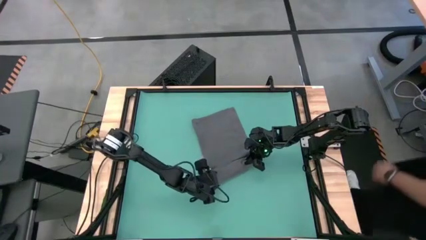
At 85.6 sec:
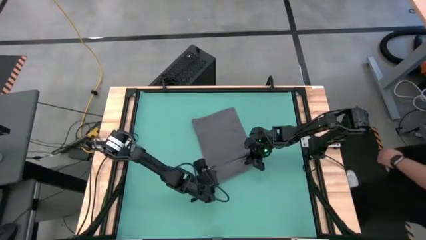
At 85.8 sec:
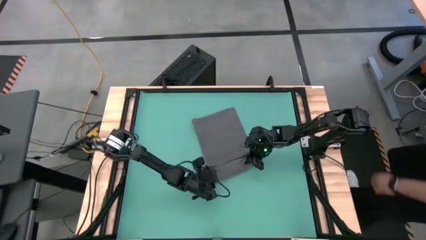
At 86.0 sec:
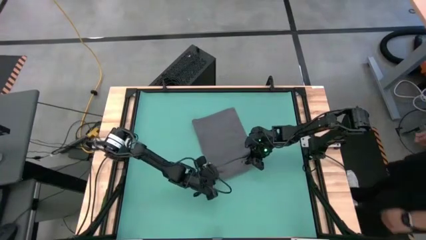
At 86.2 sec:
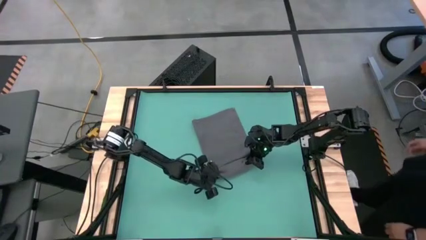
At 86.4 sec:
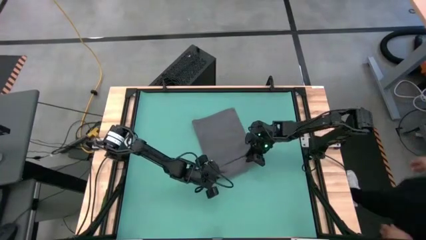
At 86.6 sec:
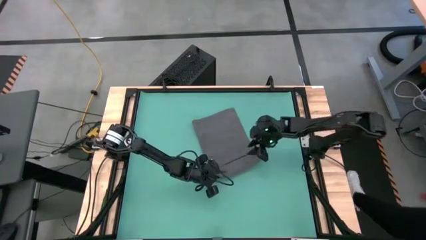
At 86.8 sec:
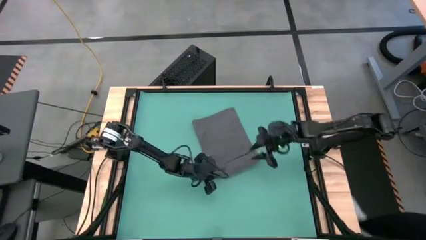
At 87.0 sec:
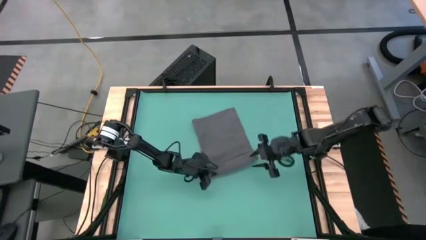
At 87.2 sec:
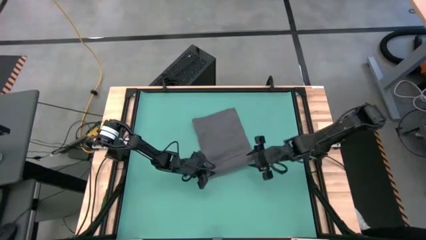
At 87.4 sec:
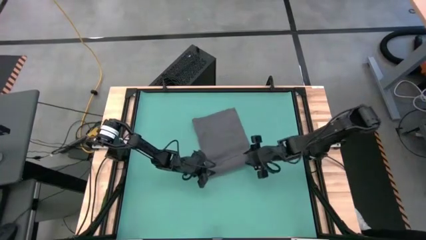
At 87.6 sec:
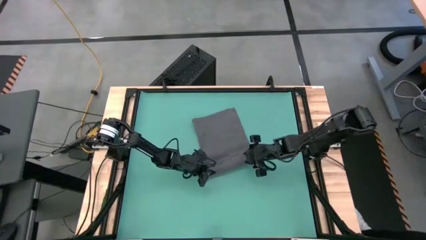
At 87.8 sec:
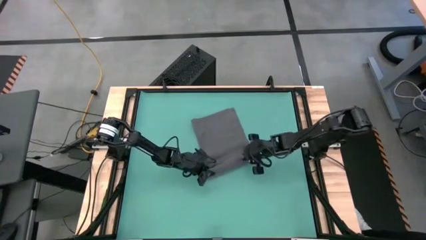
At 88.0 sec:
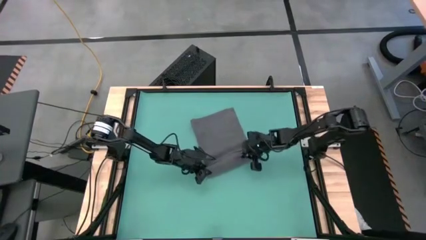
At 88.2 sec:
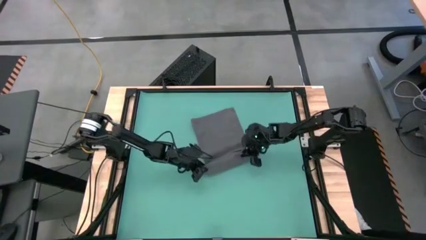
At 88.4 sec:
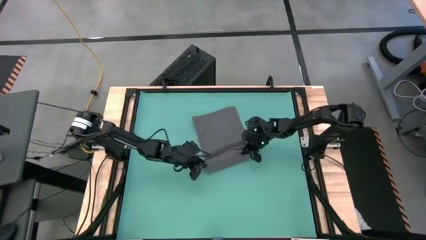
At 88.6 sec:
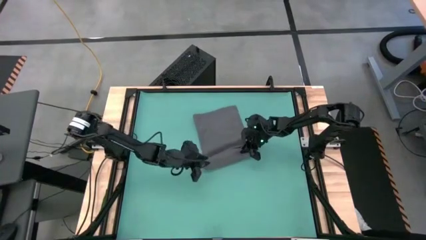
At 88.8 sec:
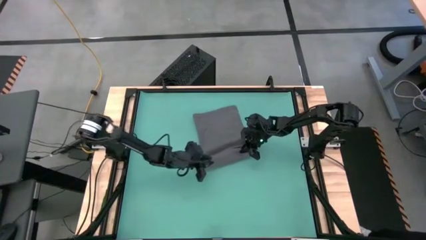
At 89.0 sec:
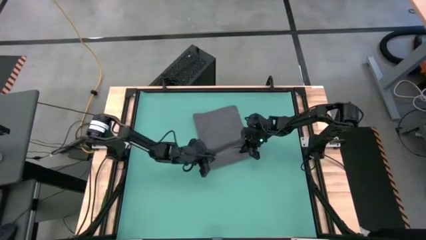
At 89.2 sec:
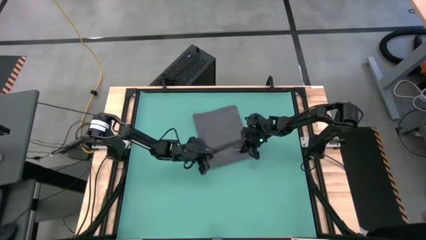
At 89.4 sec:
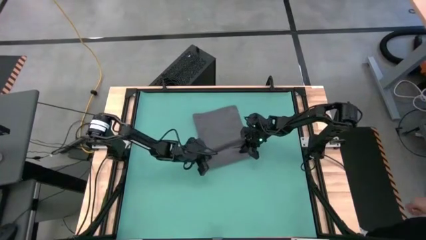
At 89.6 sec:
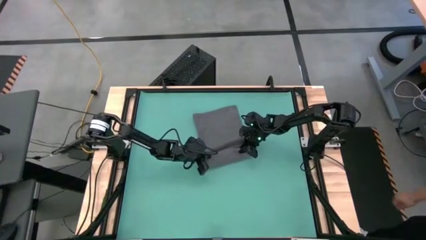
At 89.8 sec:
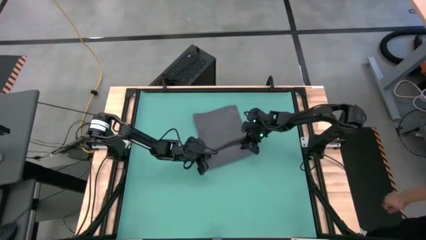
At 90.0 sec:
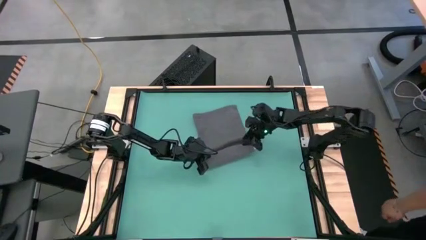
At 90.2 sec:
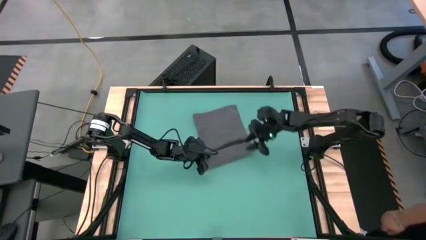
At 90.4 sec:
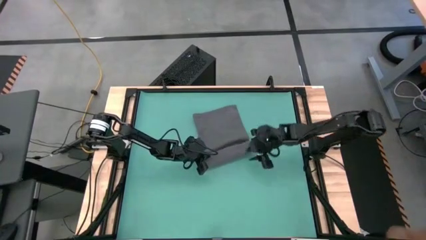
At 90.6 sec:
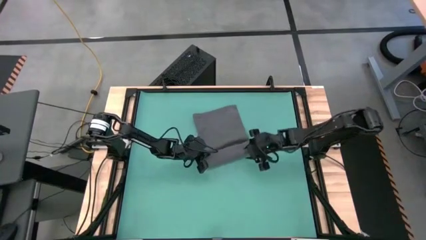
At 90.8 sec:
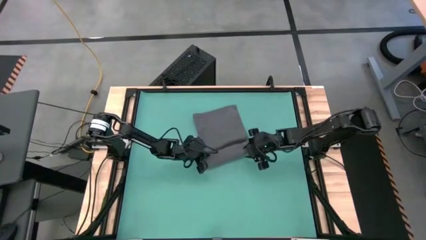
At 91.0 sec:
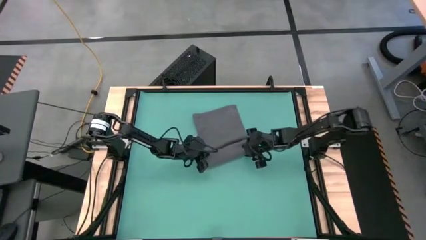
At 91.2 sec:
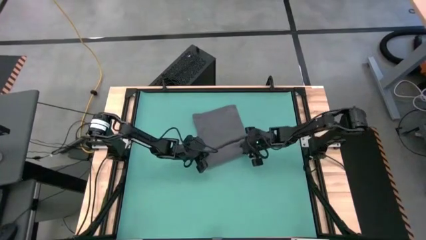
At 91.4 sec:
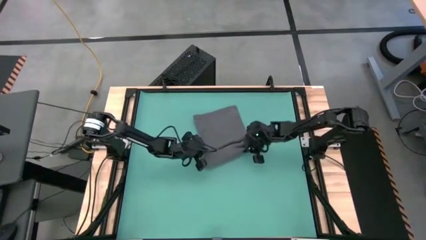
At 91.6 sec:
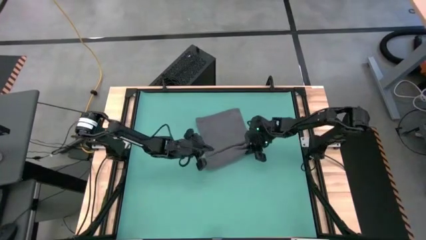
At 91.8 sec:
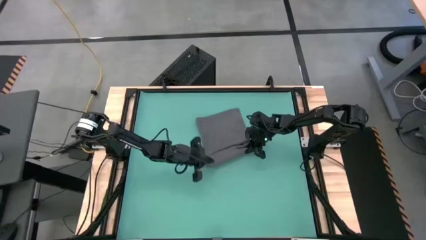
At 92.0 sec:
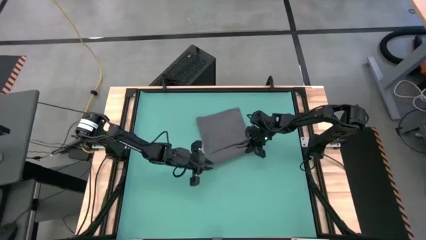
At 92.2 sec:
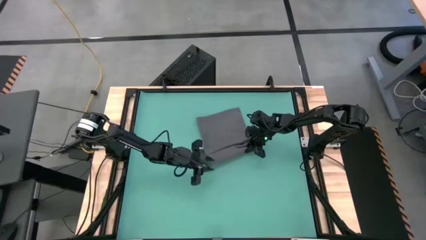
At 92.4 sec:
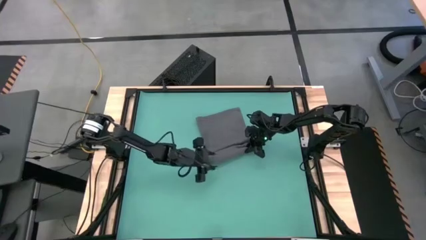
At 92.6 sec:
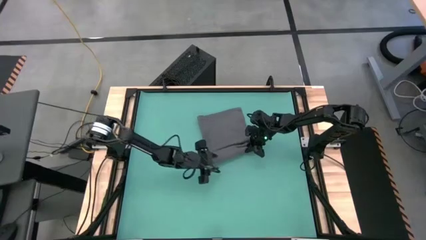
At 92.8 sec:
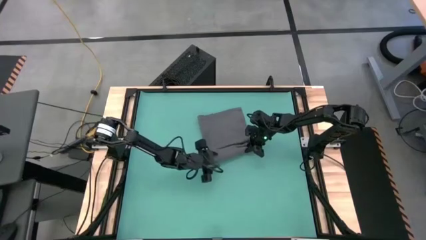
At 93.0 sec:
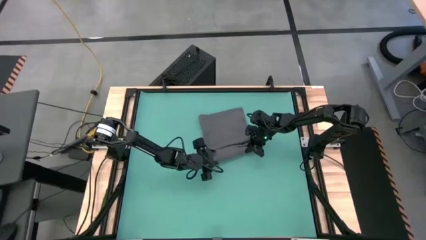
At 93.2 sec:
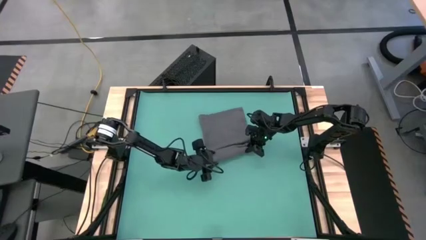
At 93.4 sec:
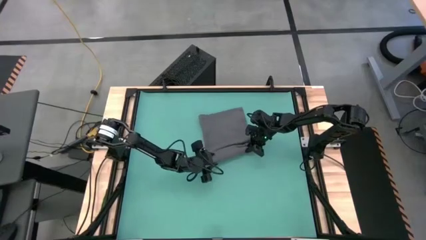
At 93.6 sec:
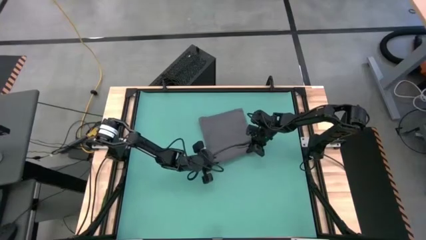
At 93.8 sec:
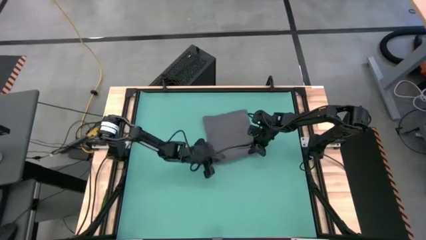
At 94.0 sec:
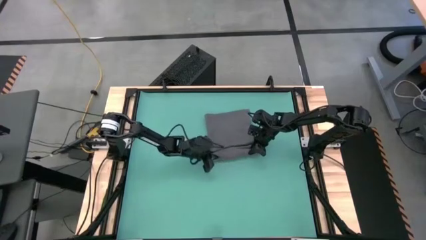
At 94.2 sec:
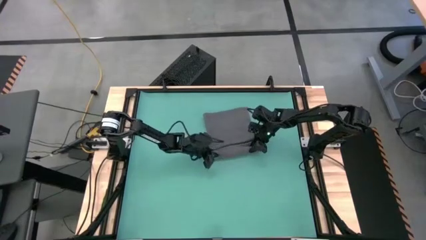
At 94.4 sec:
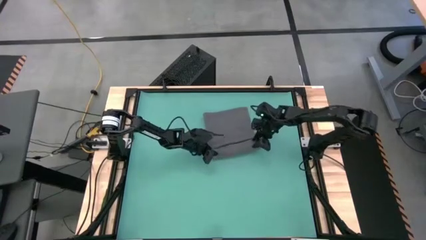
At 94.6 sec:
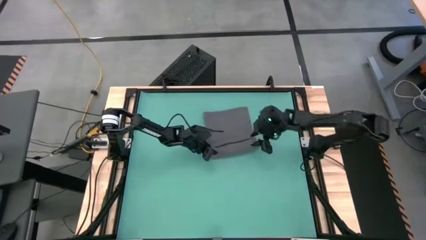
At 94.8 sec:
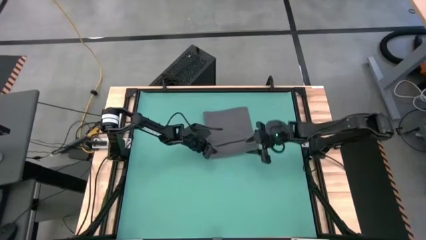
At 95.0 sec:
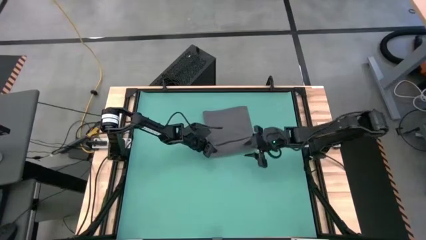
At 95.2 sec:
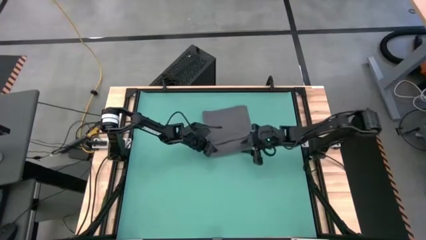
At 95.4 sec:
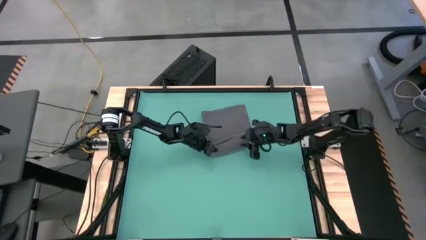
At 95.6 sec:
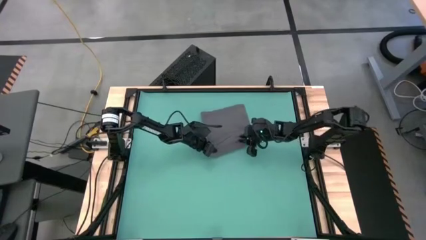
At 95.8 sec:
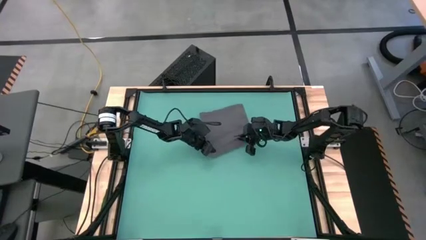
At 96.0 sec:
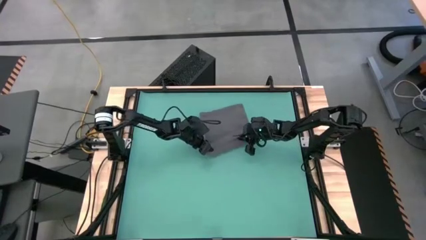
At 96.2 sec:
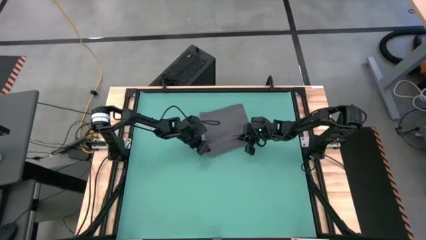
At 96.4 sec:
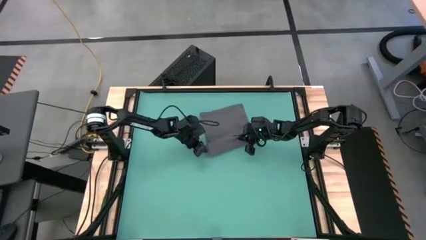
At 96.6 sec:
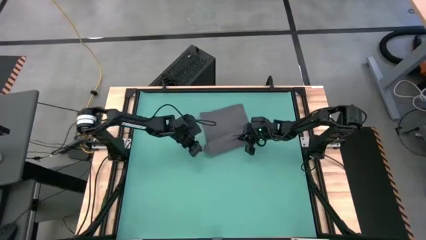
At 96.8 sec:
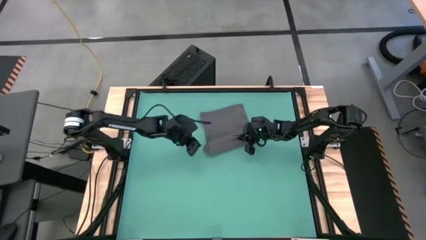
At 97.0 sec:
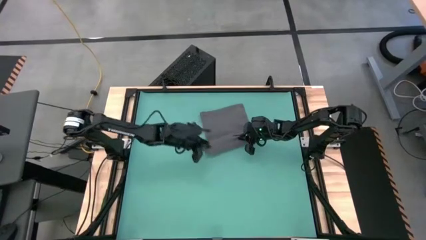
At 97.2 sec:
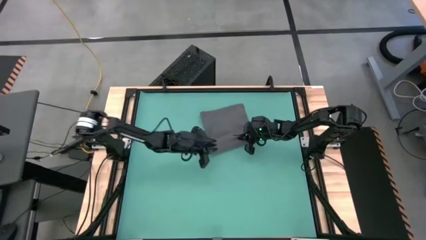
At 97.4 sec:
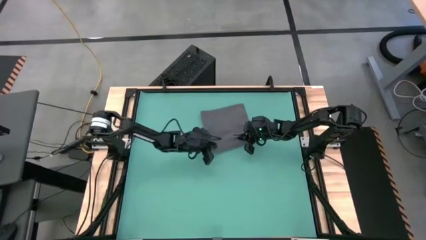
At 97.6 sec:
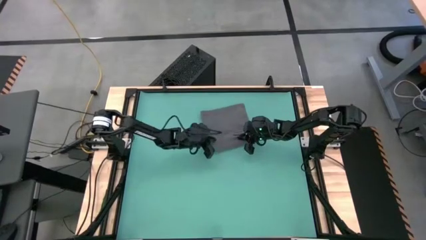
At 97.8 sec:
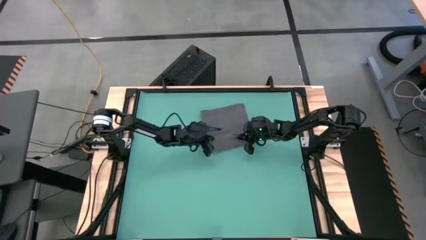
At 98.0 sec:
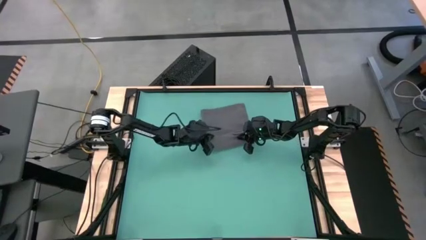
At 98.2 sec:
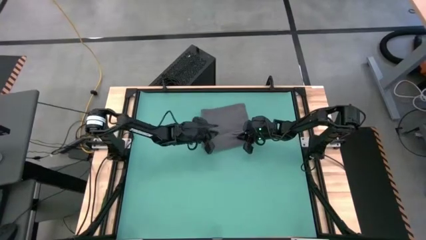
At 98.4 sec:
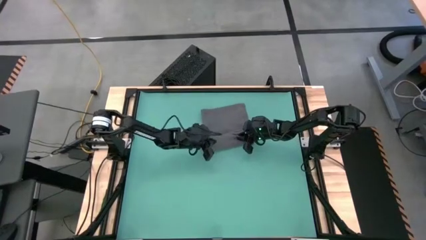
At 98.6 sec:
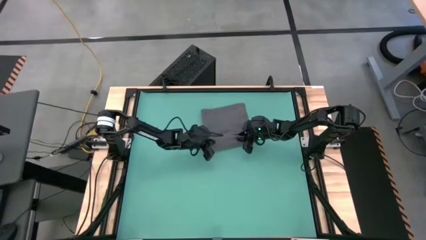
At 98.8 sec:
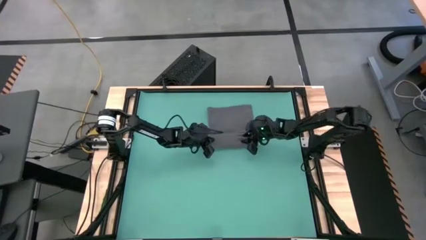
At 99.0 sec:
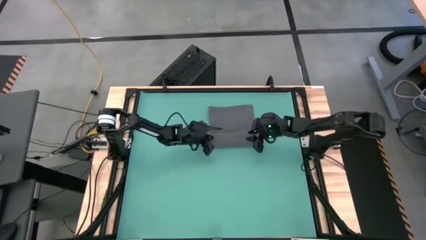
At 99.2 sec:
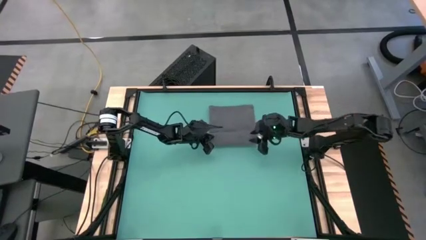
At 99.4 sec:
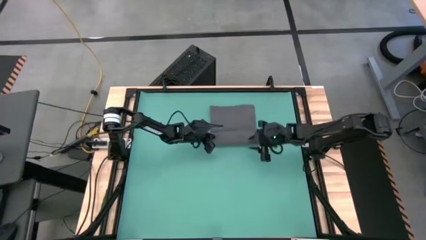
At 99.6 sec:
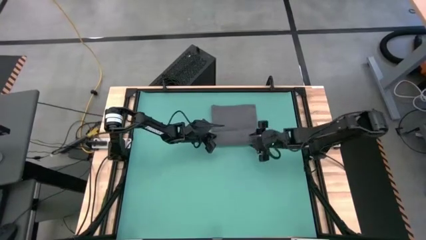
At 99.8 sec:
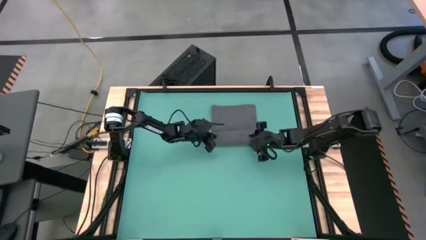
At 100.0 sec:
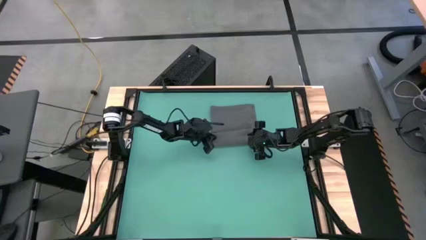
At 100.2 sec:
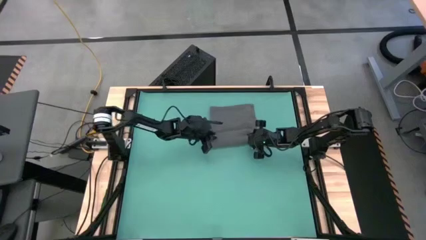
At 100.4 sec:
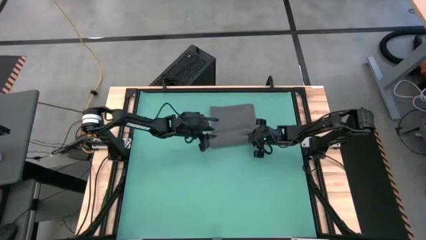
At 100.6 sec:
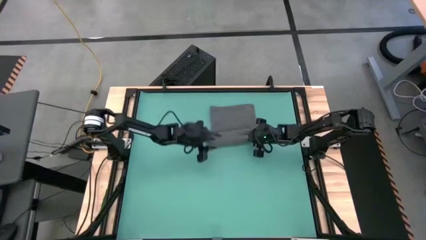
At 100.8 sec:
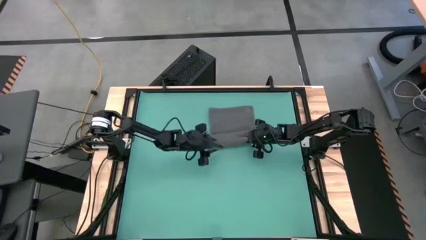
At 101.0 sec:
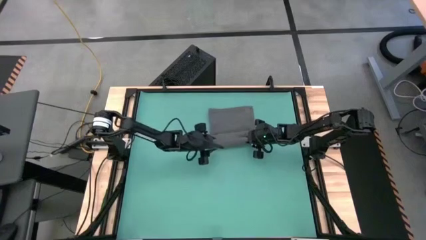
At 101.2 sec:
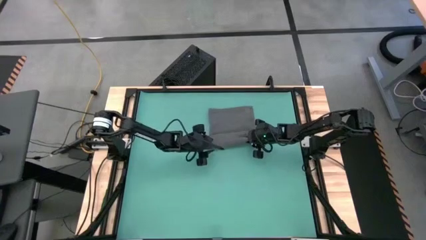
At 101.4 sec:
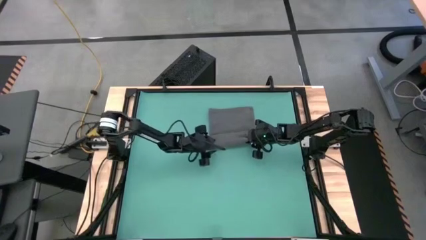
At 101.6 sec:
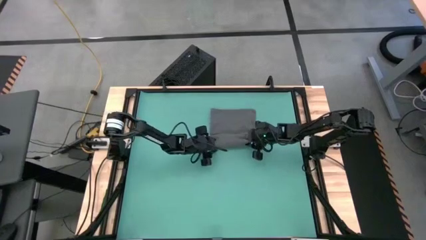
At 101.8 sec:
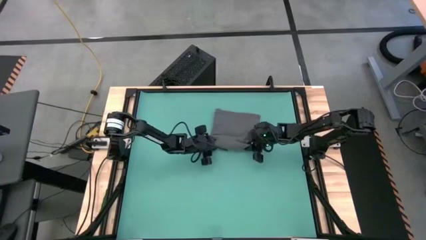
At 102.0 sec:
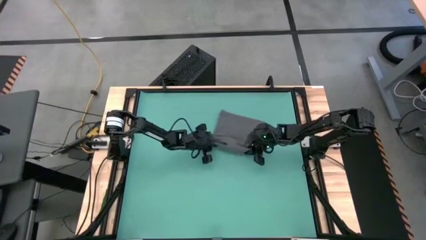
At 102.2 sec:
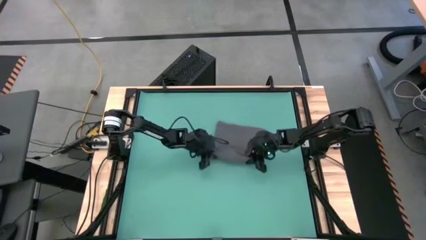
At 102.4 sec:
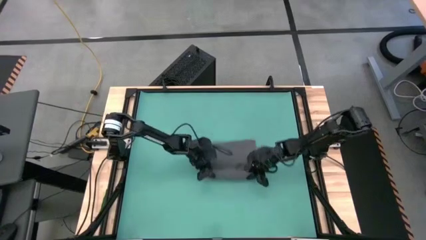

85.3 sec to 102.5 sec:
Task: Roll towel into tight, uniform cylinder
Roll the gray towel
